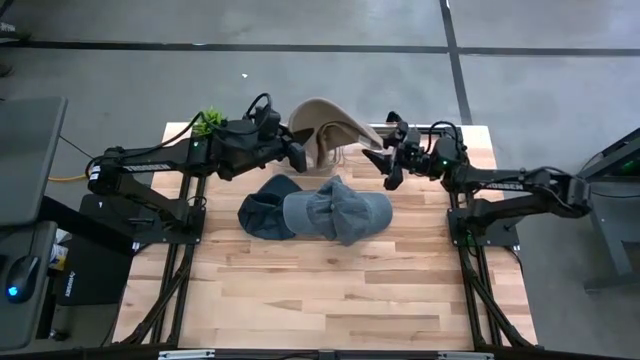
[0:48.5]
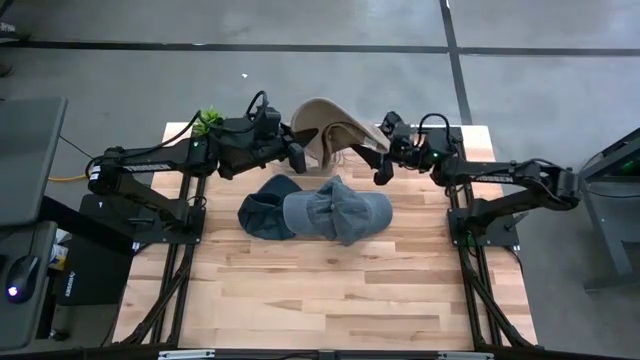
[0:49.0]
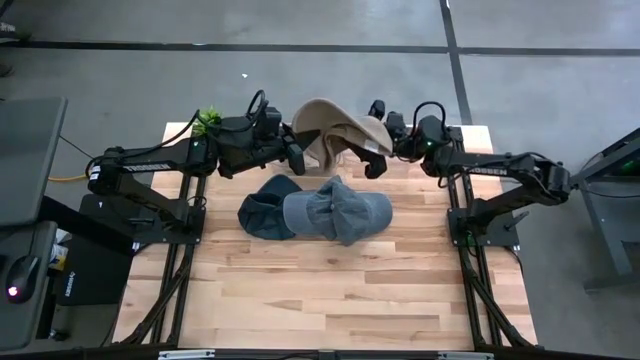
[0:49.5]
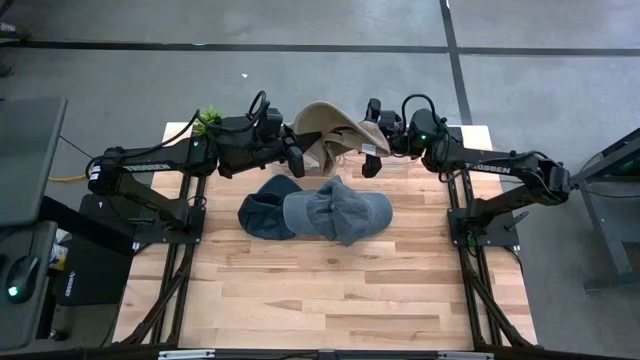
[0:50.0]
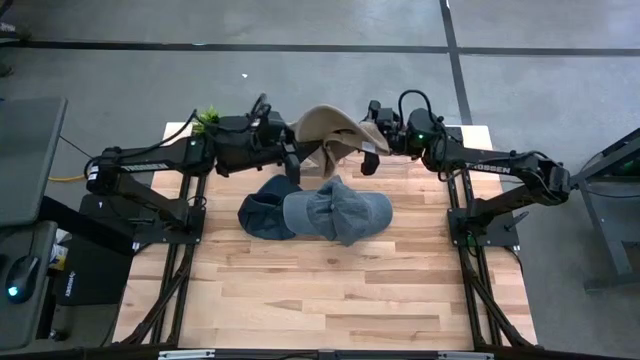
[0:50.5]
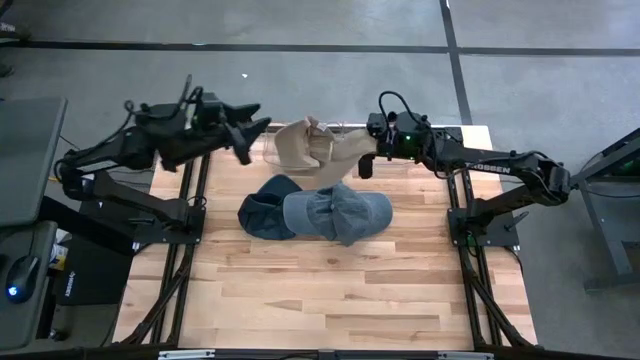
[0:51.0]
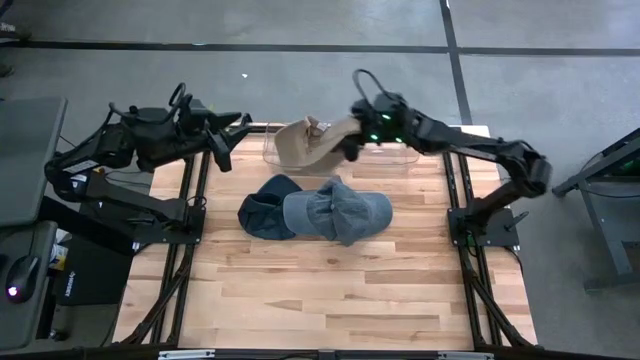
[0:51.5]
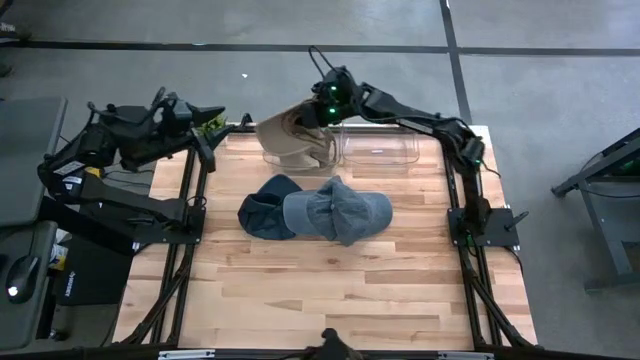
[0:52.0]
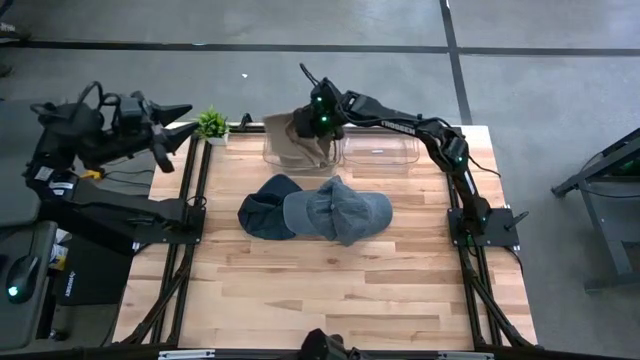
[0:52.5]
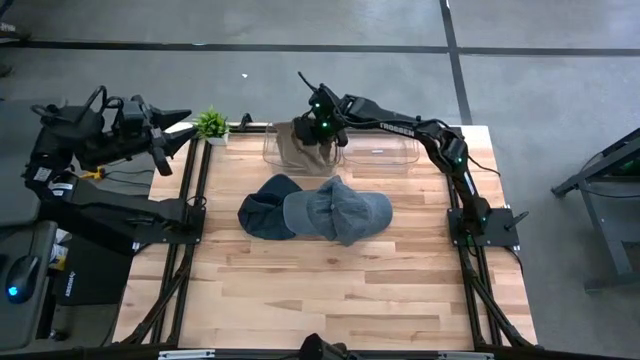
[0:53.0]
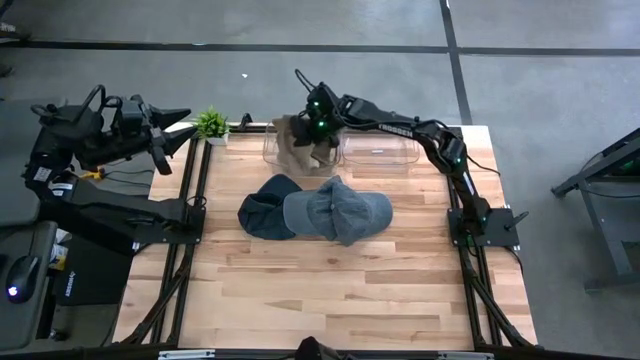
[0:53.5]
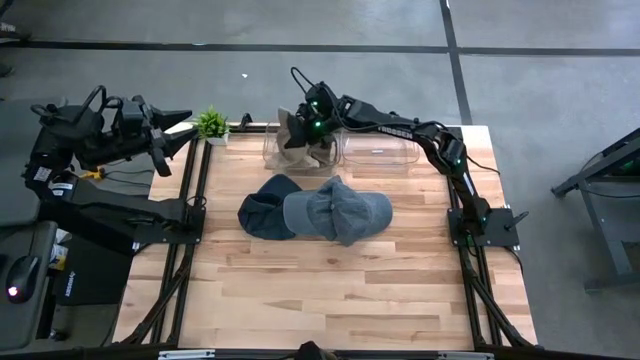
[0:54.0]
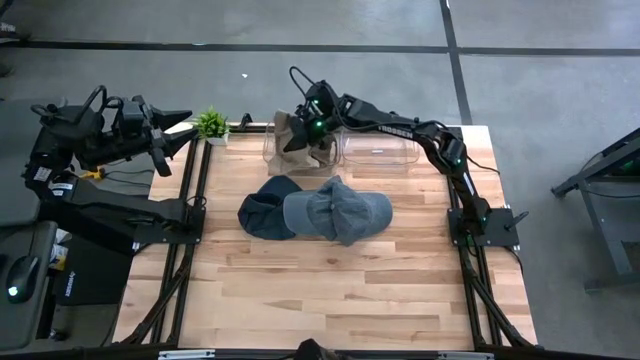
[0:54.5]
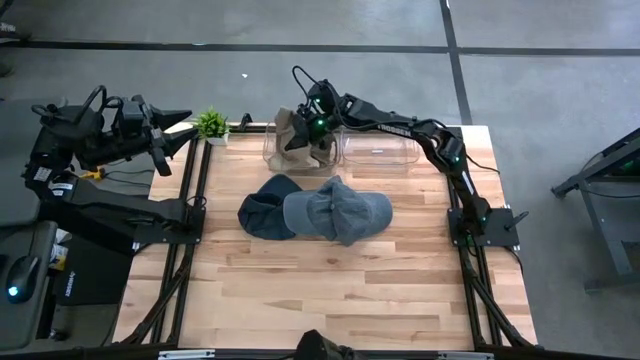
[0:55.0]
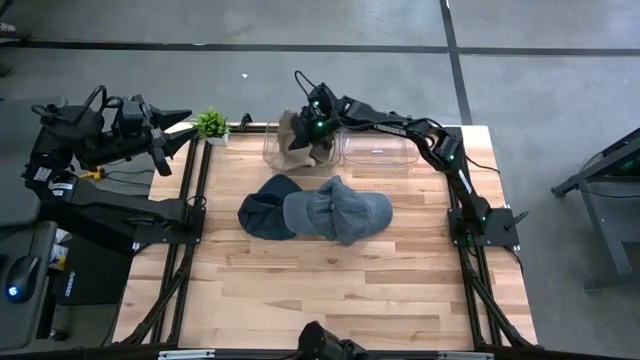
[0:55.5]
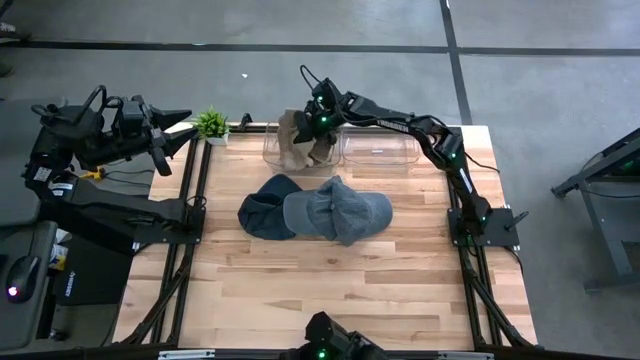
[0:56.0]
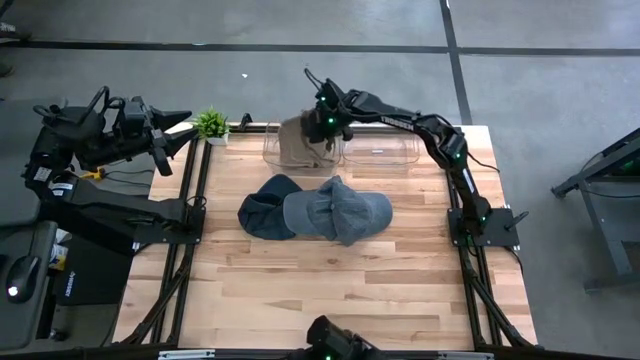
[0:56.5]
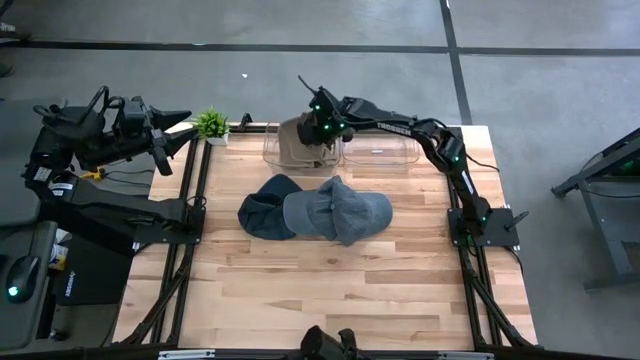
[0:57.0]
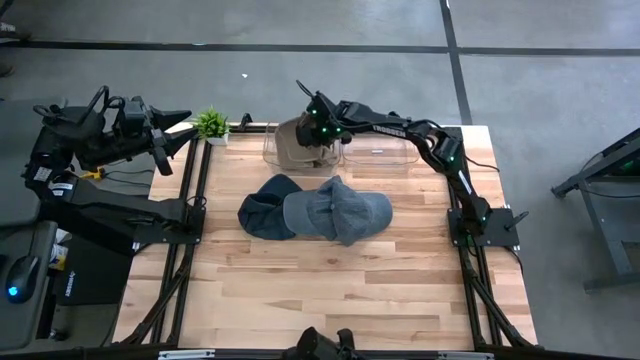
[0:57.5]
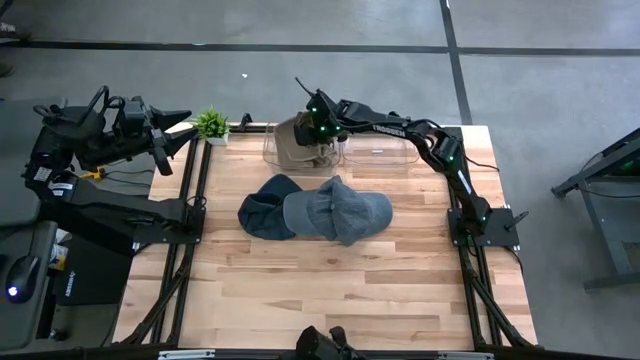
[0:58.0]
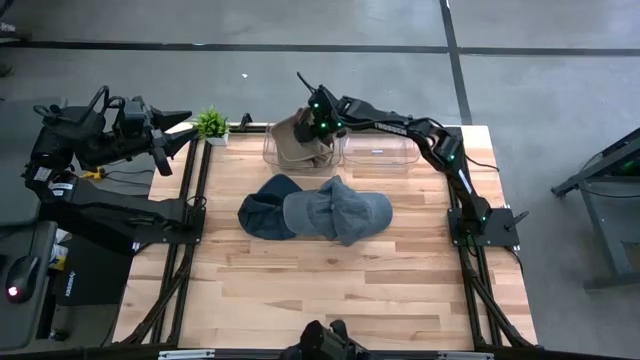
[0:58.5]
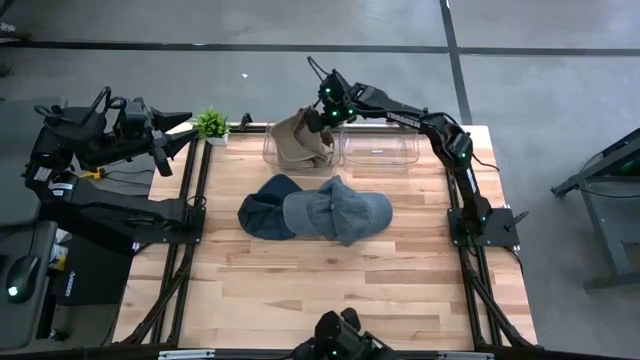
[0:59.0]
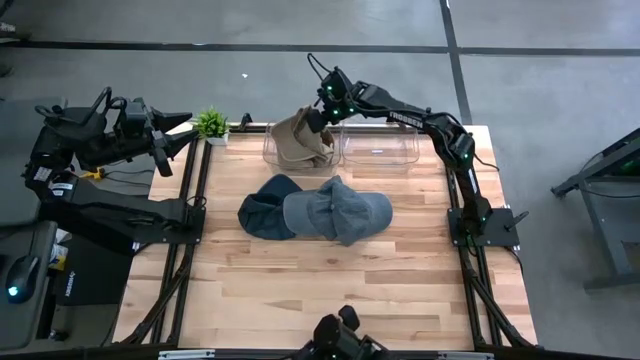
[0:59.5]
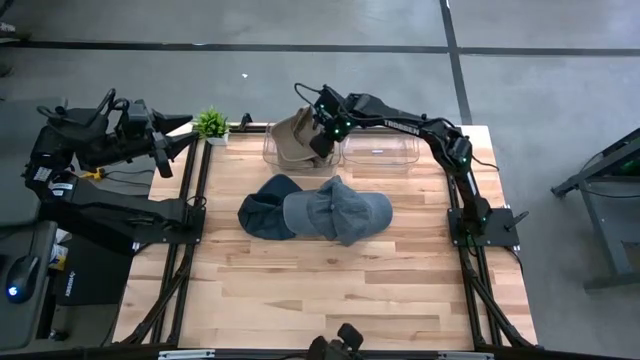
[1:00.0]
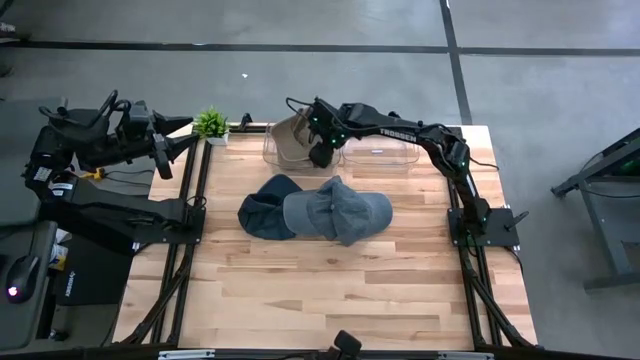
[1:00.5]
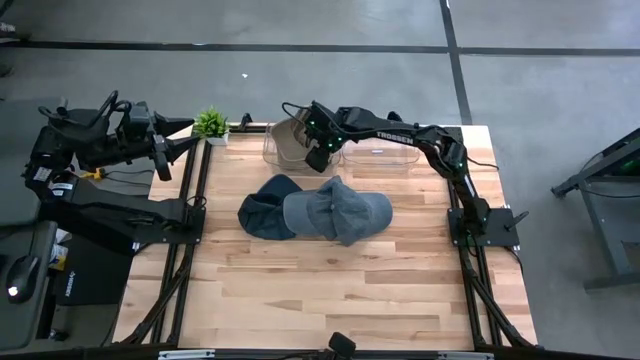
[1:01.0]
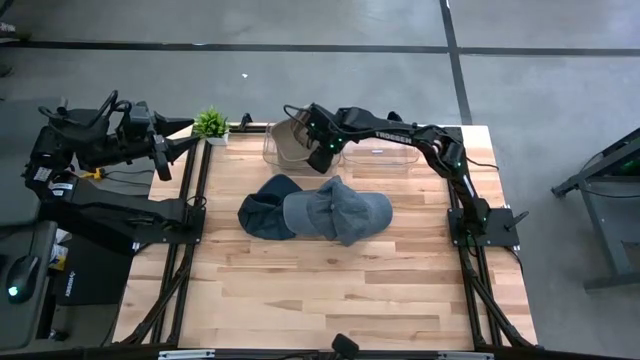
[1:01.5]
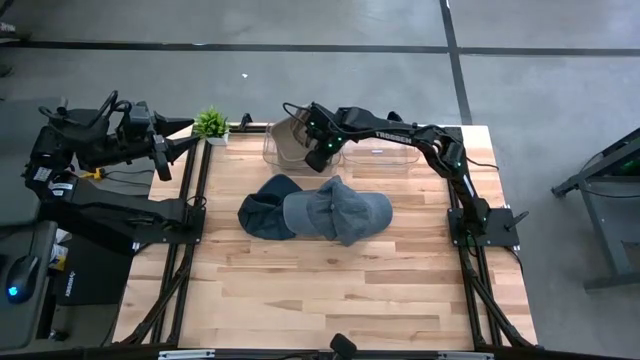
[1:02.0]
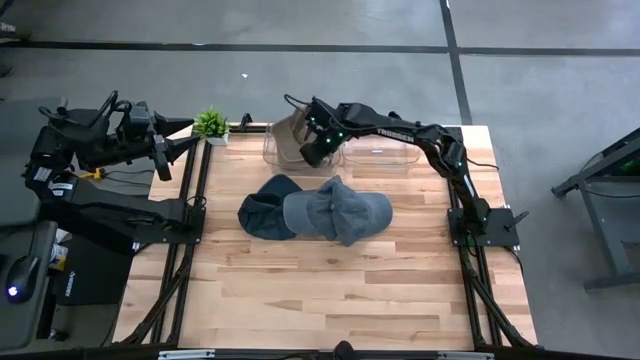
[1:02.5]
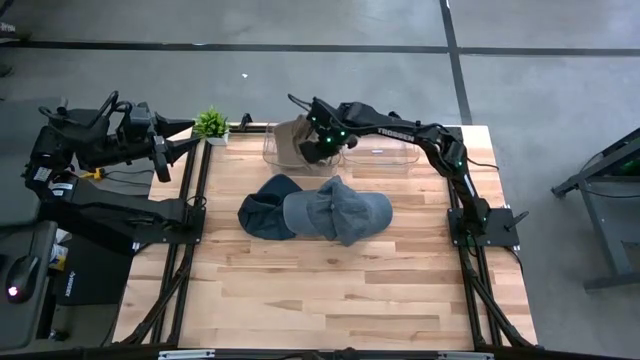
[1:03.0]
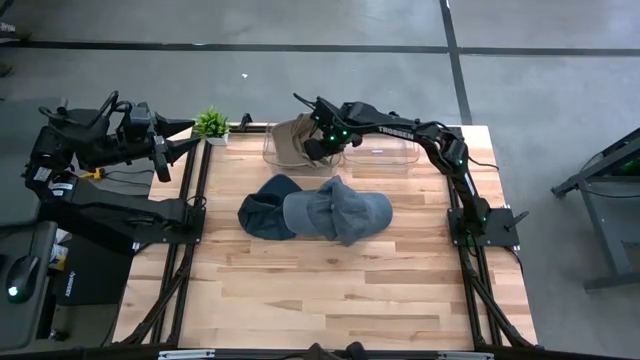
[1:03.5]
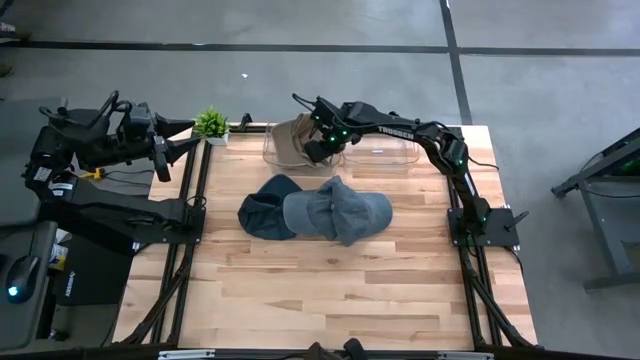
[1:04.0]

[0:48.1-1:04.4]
Task: Pick & Place hat
Put the brown cap into the left transparent bin

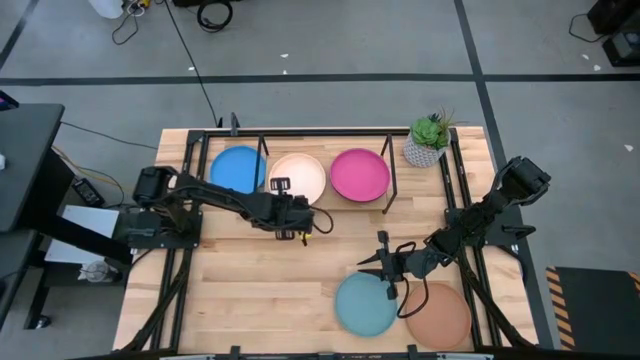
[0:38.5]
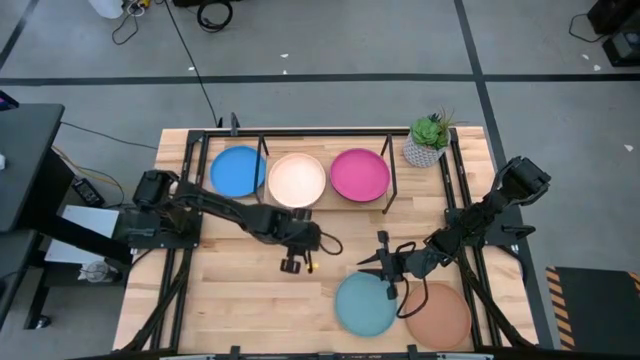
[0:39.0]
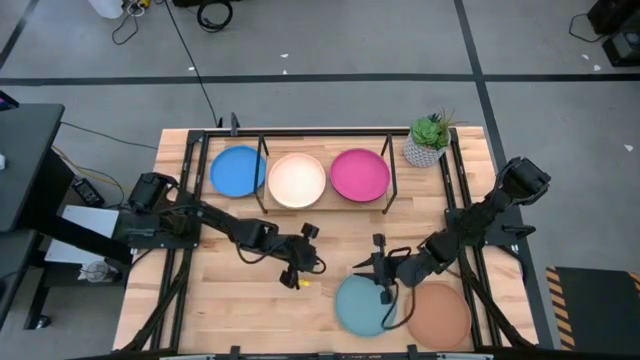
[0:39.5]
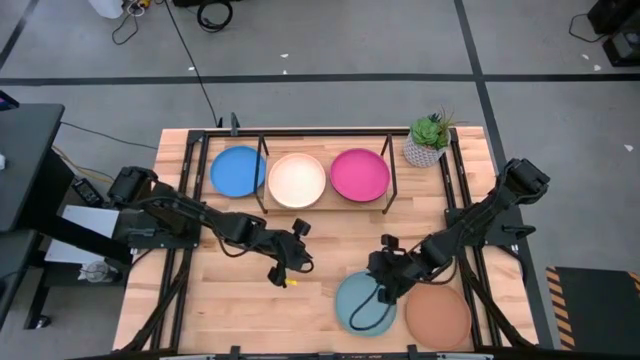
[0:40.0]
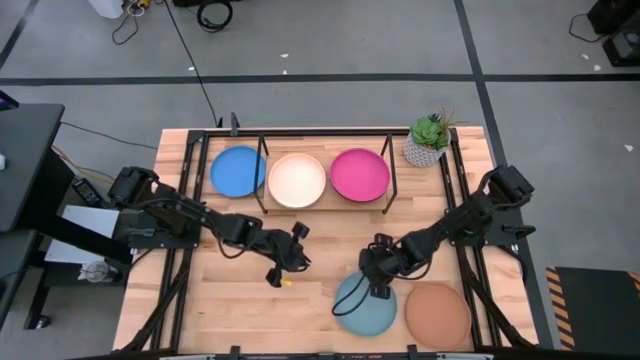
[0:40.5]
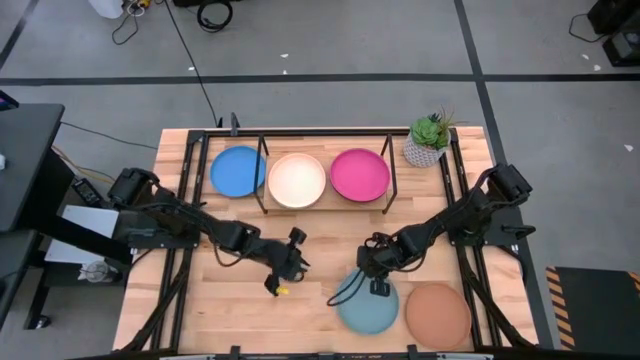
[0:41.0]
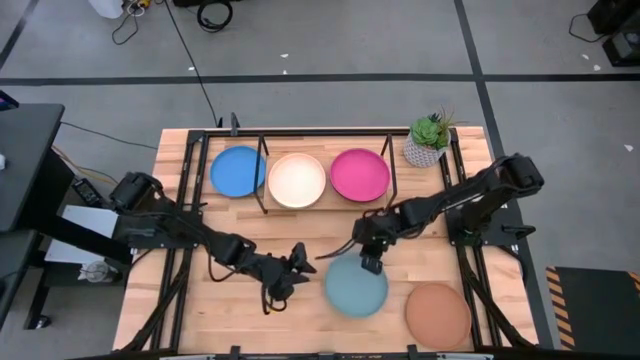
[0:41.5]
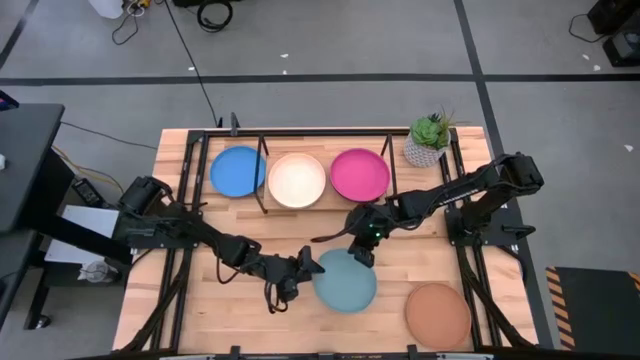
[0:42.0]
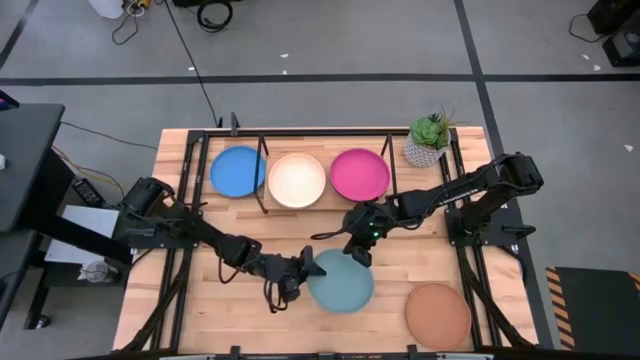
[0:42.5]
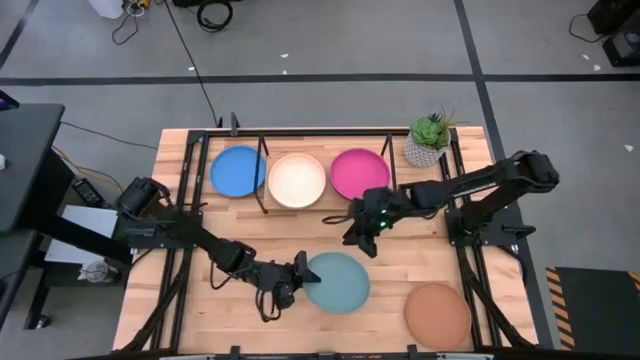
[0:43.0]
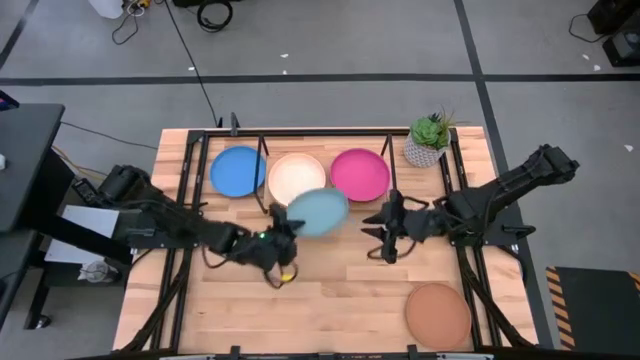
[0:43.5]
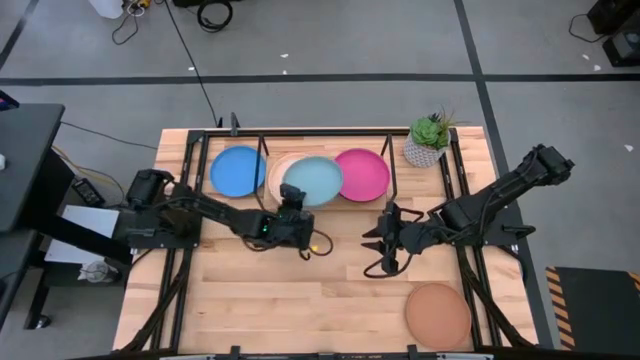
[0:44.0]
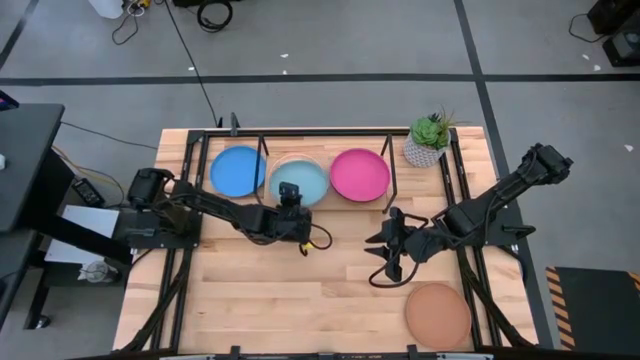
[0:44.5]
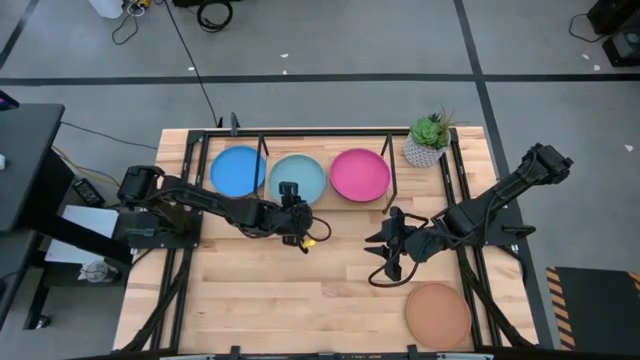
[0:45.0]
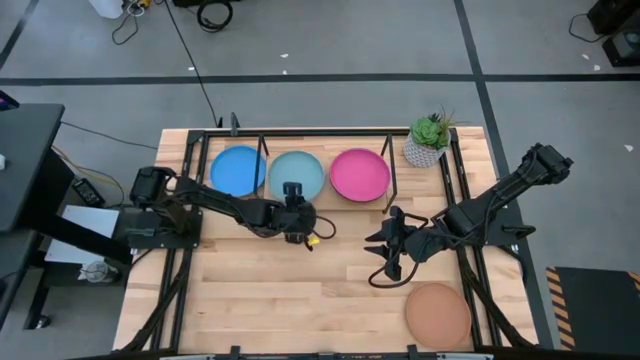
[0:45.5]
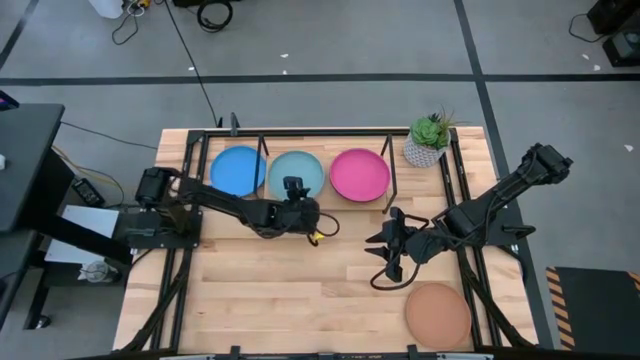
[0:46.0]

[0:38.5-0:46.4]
Task: Place and stack plates onto a shelf
Stack the light blue plate on top of the light orange plate on the shelf
